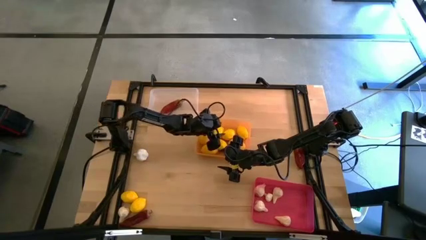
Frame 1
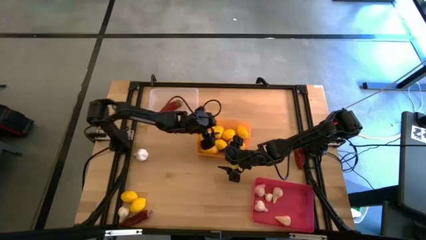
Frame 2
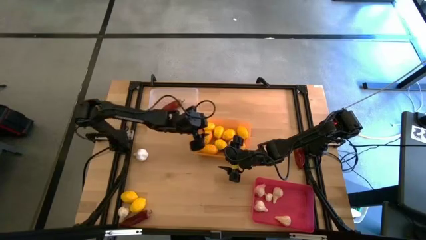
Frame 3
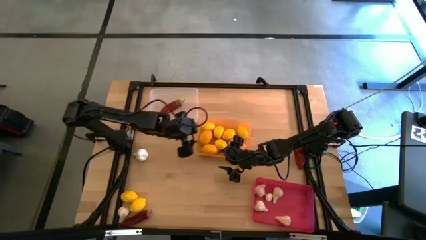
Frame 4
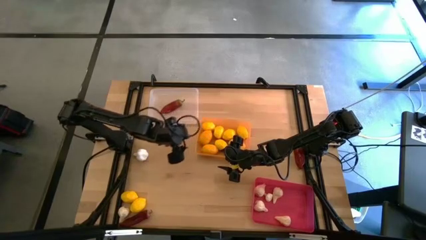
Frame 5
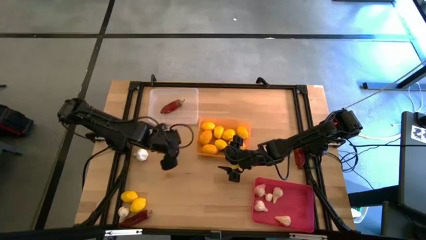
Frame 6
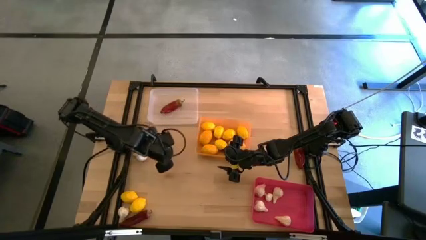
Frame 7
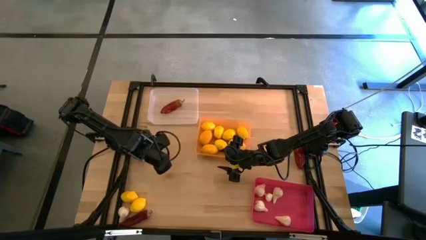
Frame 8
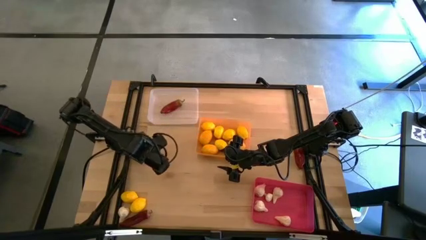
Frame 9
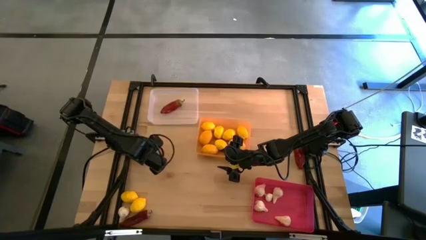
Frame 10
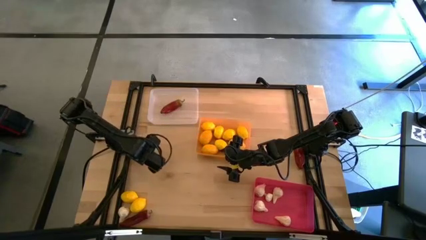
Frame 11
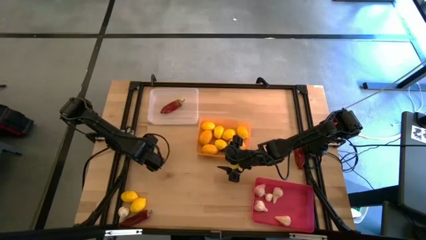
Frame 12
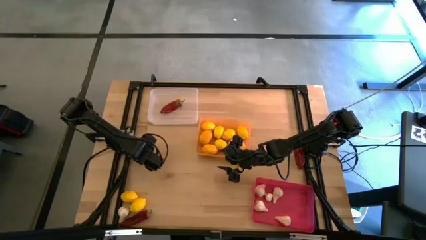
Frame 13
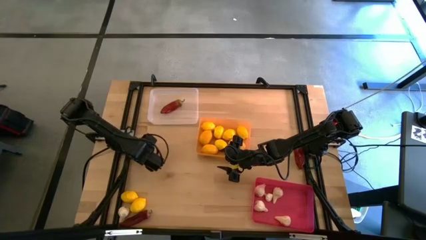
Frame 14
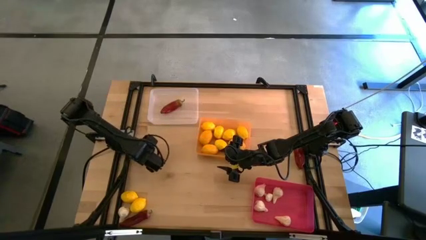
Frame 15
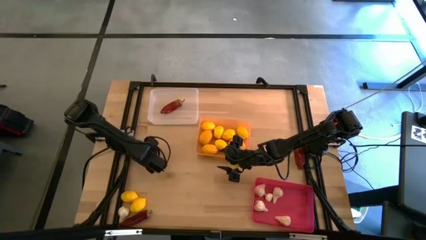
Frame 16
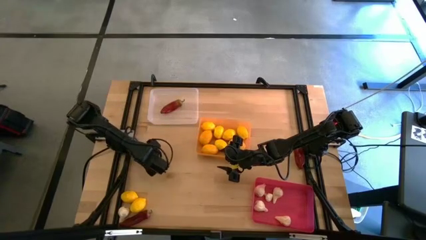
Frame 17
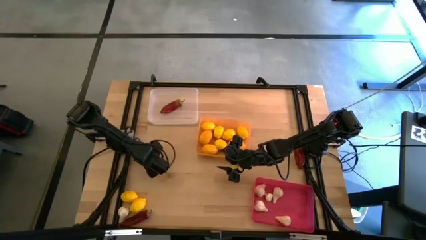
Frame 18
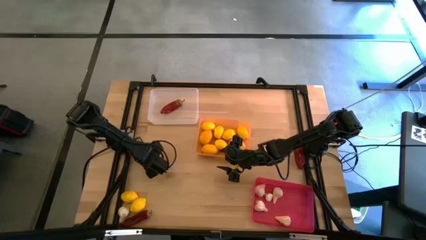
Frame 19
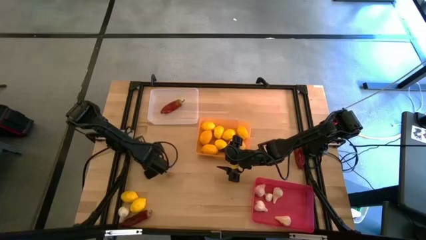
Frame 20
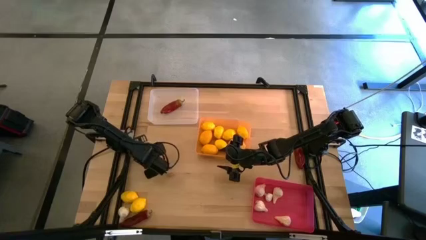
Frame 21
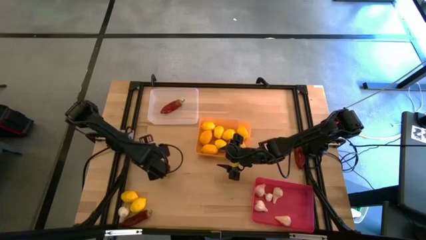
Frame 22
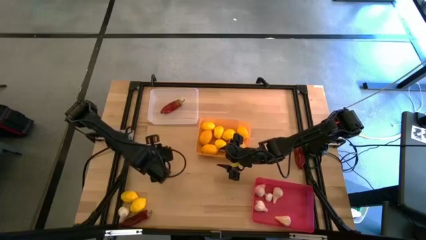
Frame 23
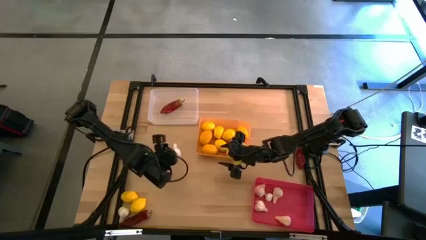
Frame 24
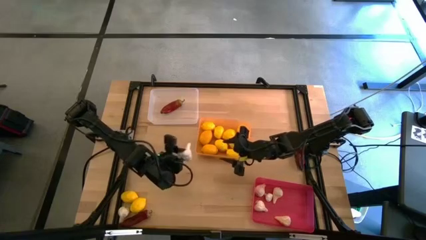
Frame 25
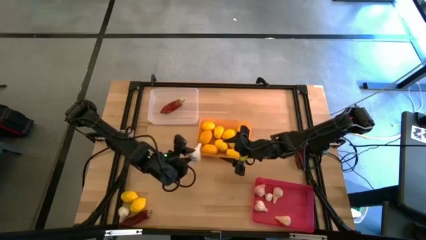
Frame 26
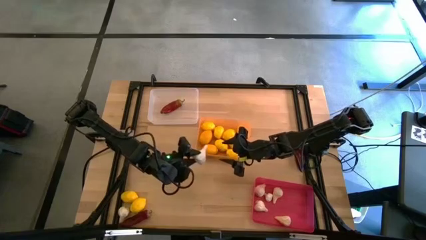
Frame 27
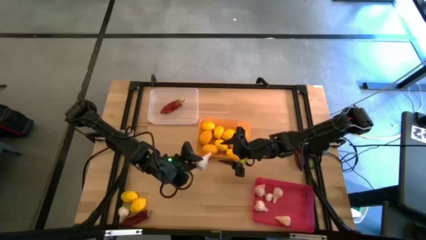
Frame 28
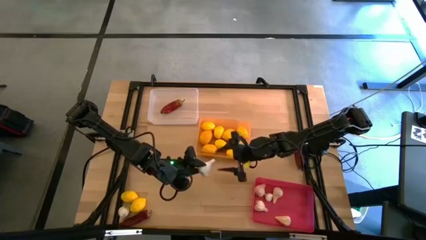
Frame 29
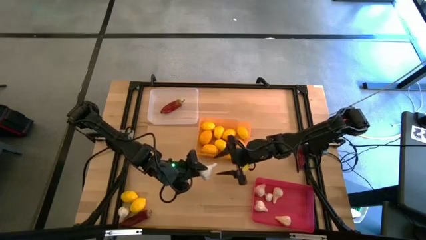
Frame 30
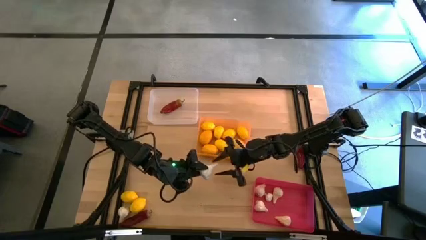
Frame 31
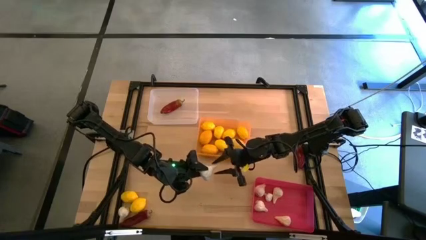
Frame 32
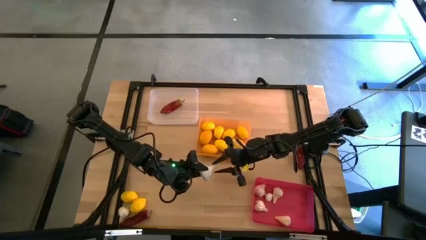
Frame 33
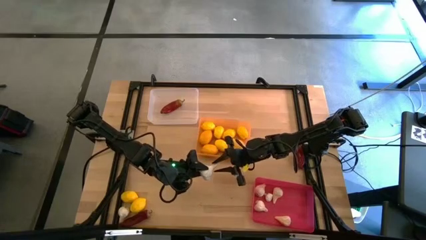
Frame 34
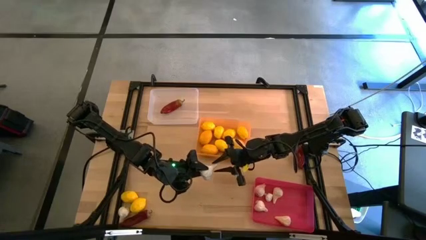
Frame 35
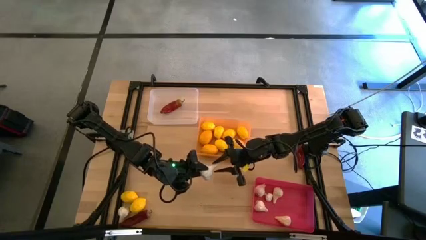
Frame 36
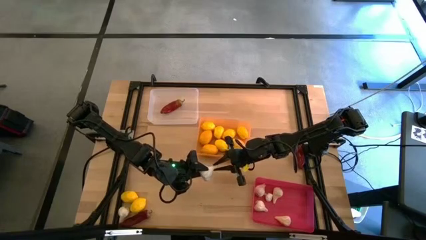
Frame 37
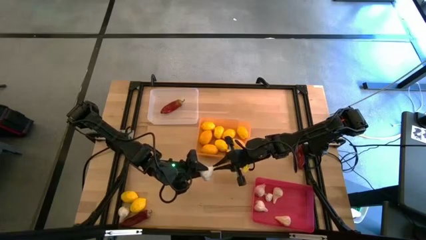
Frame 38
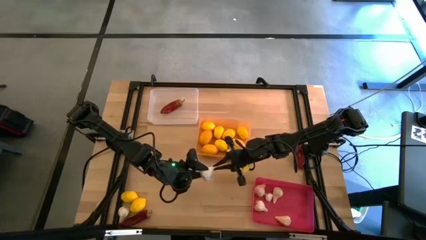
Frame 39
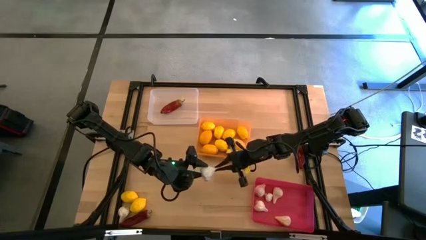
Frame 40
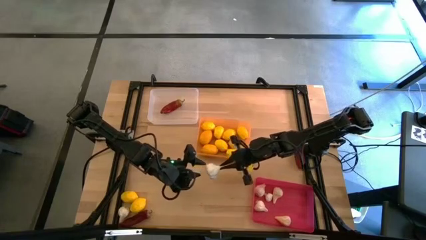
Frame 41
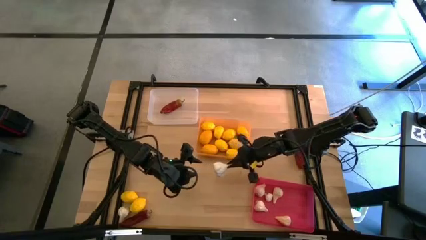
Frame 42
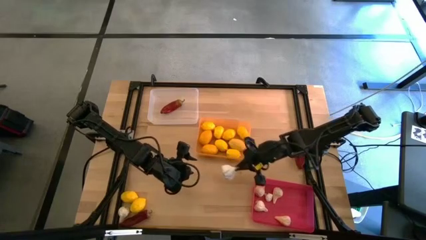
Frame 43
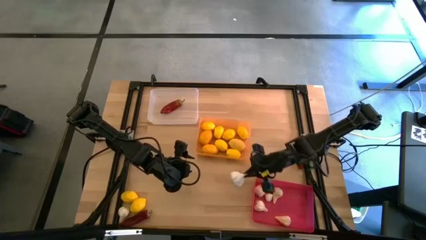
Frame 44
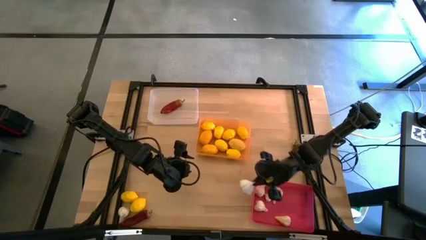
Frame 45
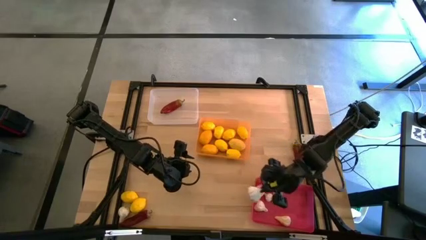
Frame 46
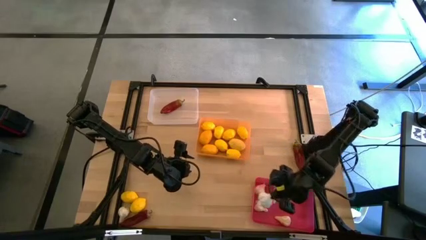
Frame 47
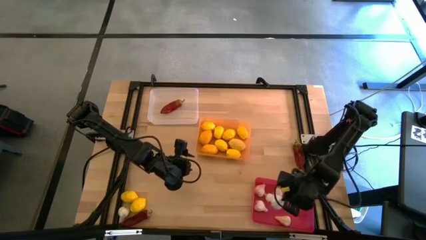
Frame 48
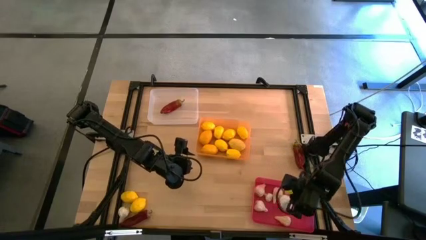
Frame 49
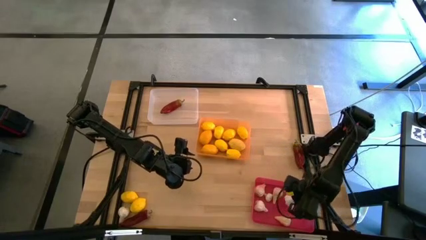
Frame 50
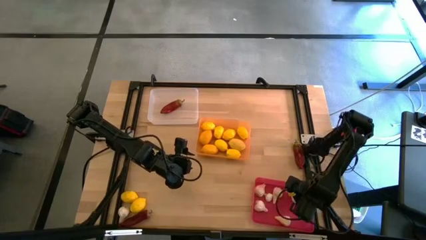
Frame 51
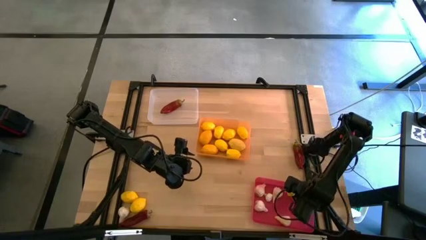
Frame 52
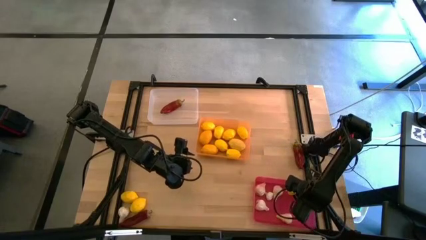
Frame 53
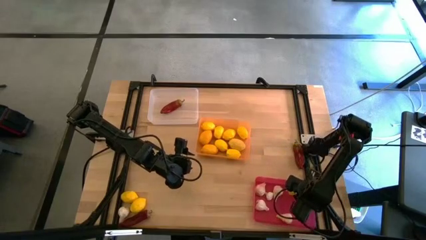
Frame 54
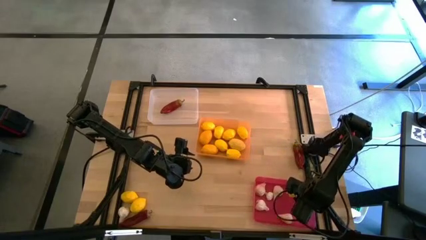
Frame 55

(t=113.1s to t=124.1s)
Task: Sort produce into baskets
Put the garlic into the red bin

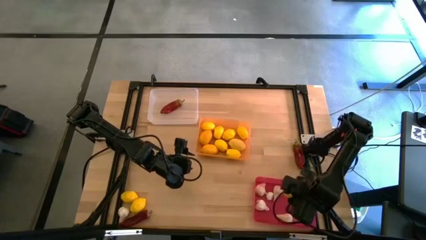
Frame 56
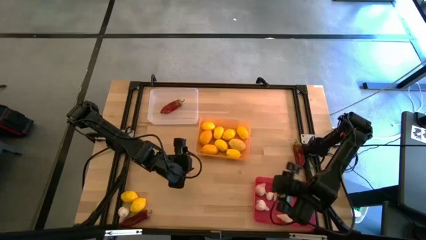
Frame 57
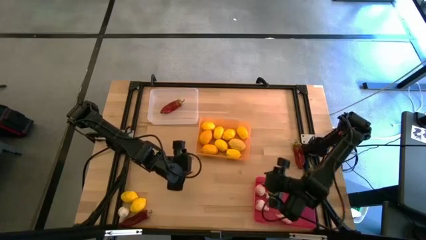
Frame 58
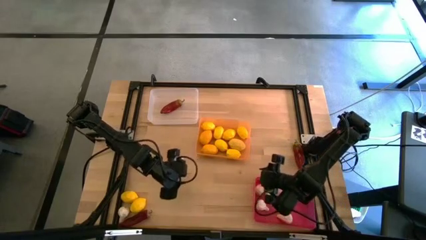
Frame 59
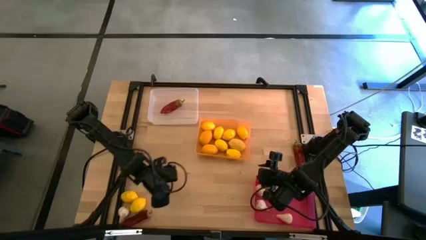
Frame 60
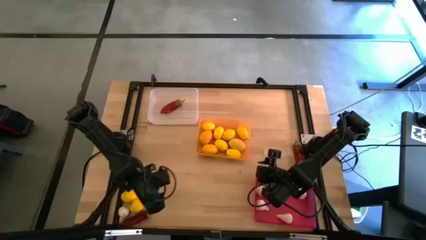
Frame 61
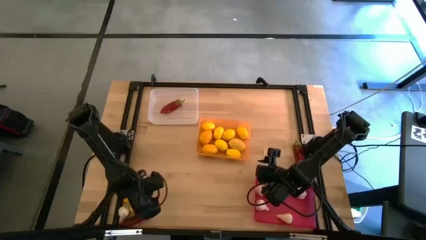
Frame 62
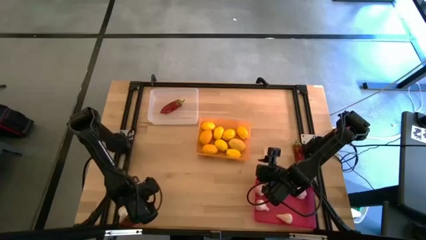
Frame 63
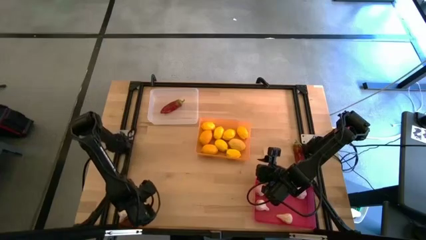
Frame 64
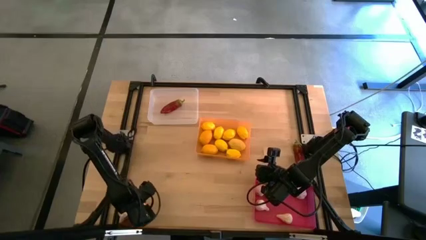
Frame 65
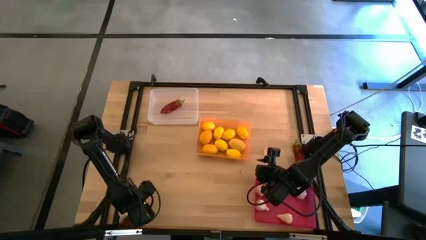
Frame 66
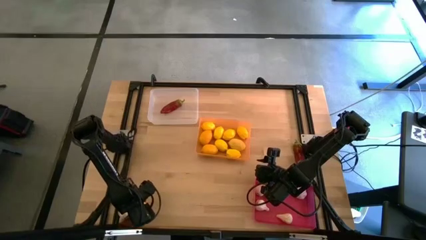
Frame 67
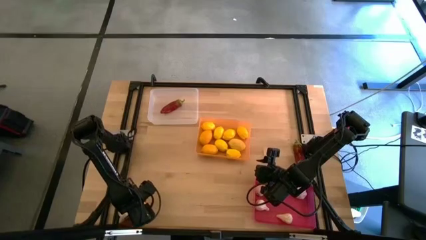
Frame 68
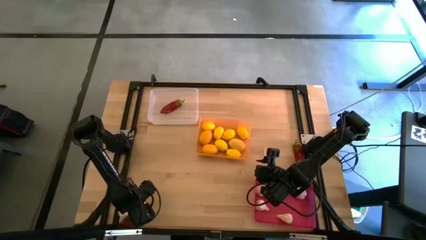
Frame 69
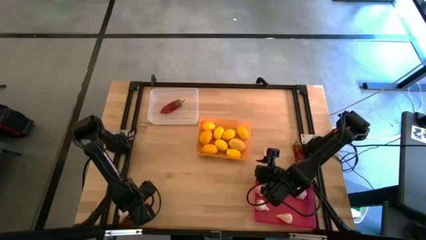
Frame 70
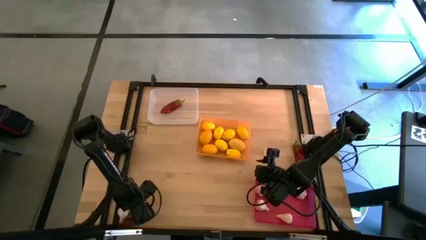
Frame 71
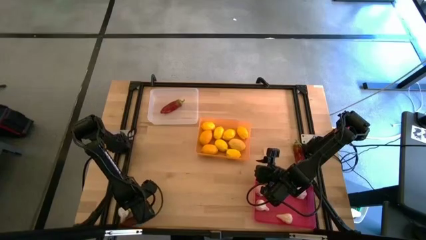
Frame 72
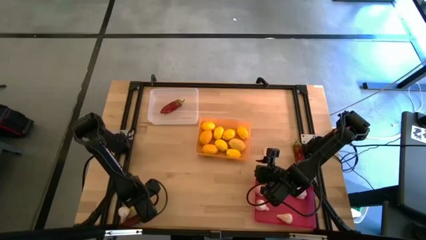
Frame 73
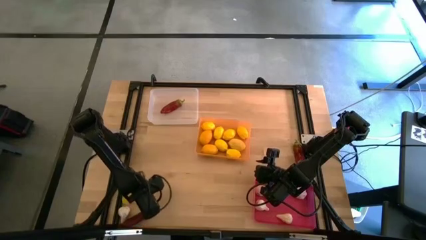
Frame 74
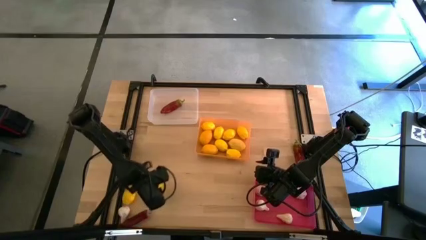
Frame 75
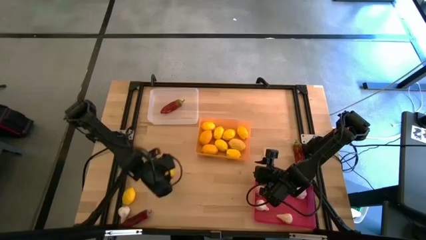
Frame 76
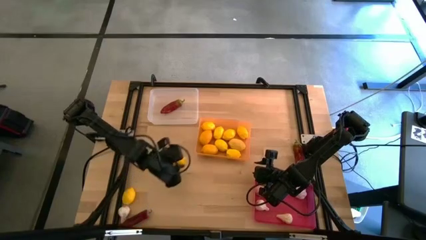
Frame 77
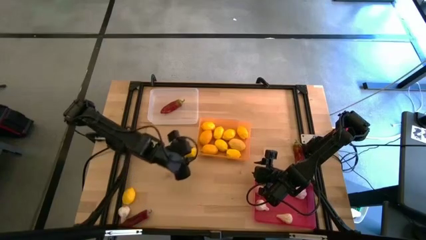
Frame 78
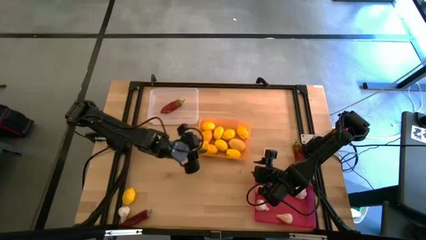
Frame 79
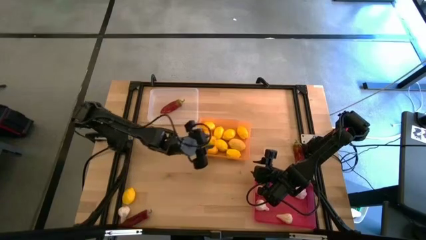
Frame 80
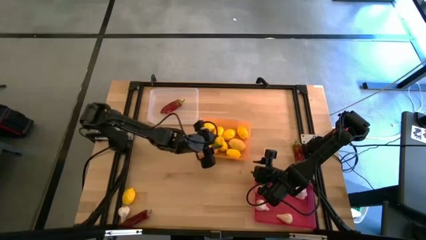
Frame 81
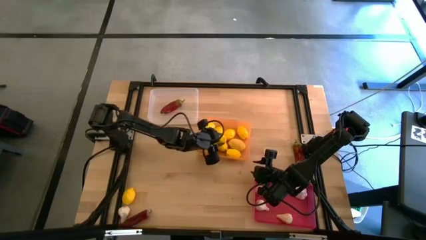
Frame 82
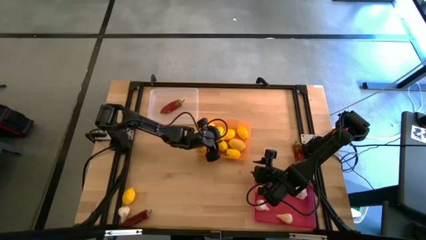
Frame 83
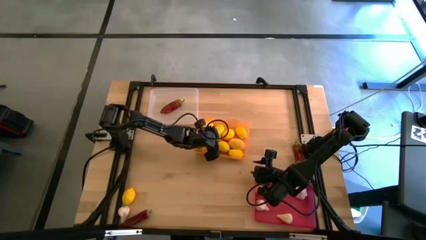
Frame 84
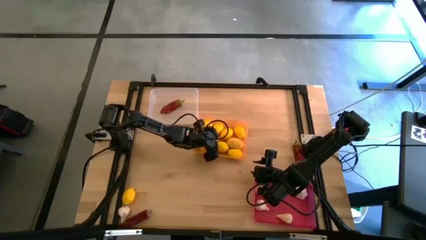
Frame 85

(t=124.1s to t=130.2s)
Put the lemon into the orange bin
